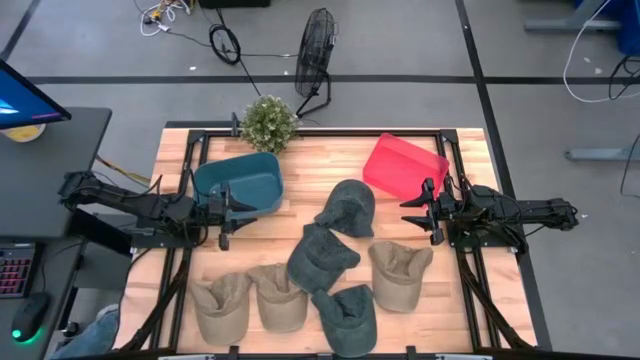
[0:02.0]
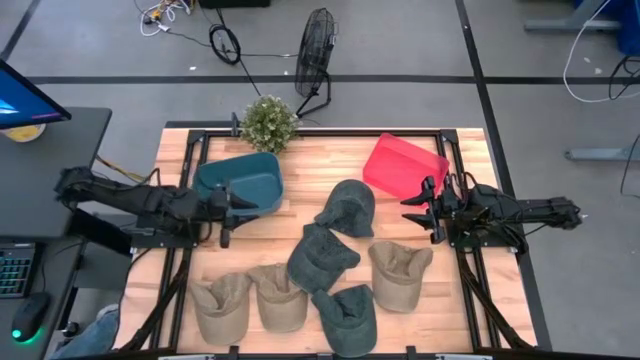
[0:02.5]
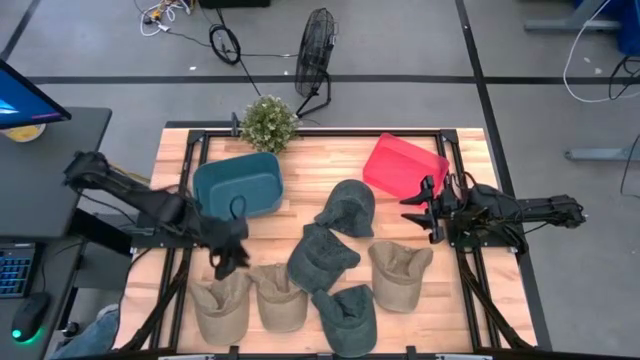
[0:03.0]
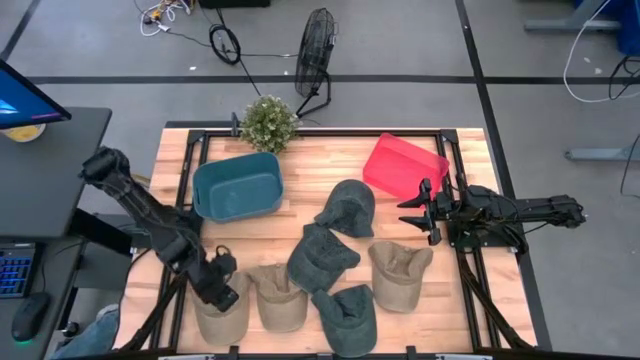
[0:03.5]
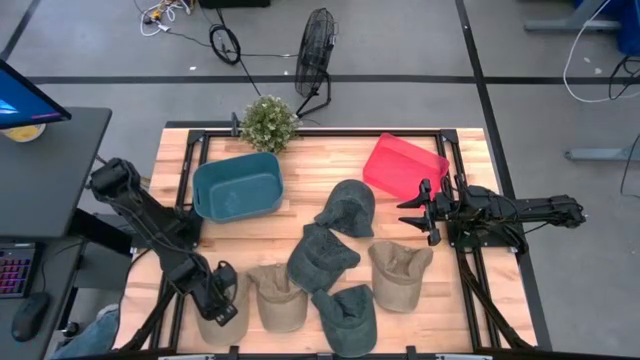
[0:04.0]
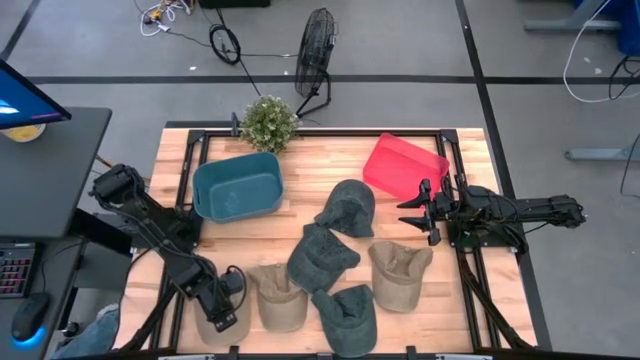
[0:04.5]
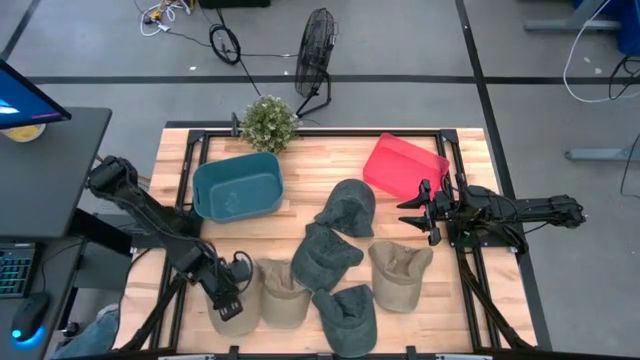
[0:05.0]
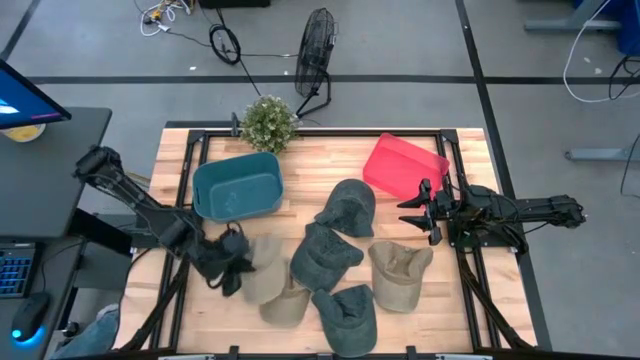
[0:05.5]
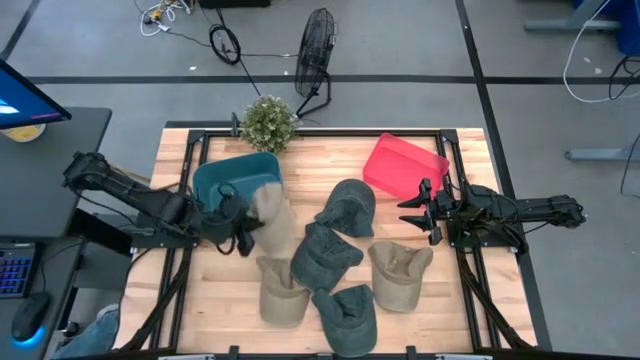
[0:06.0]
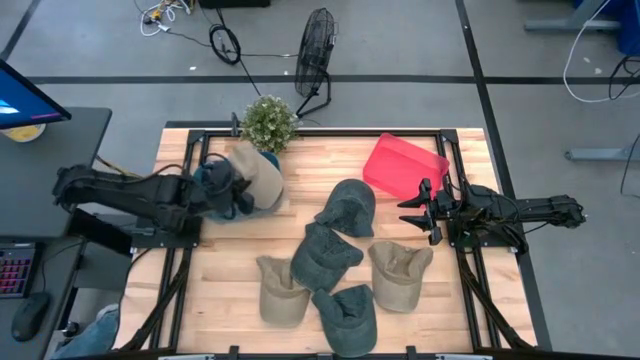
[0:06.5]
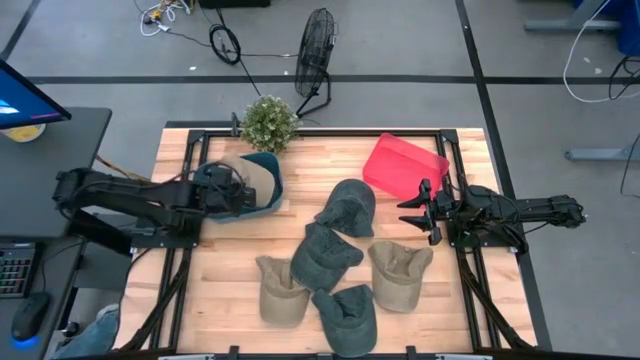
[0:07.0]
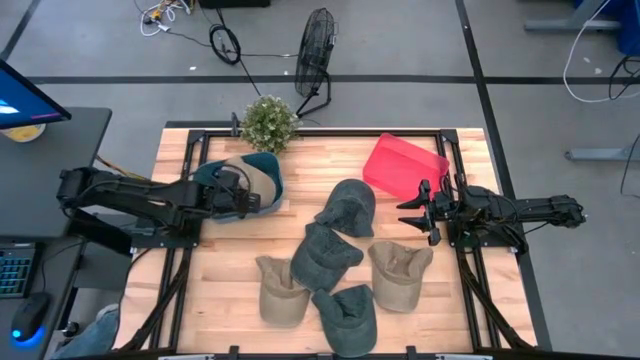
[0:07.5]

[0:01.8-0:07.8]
Task: Pick & Place hat
Put the left brown cap into the blue bin

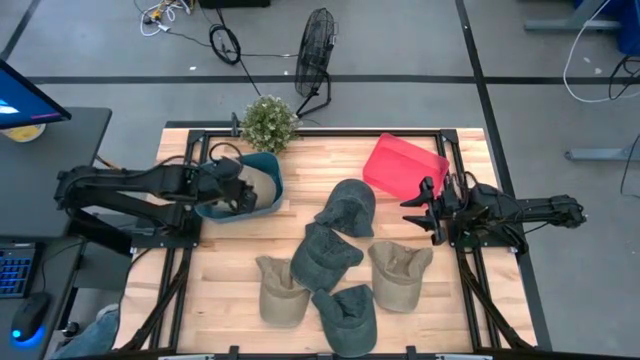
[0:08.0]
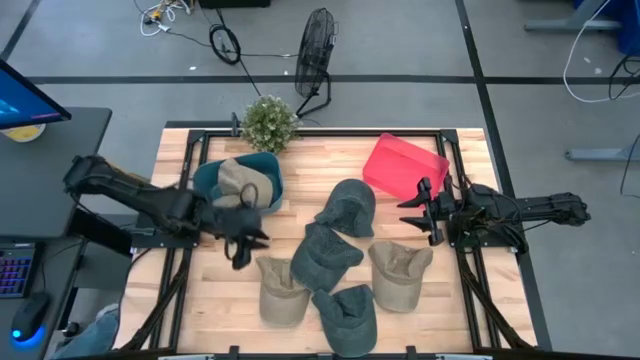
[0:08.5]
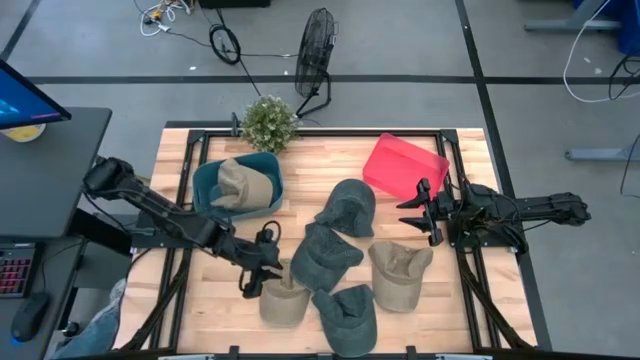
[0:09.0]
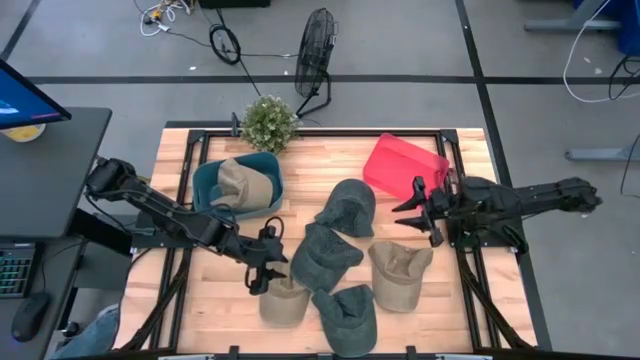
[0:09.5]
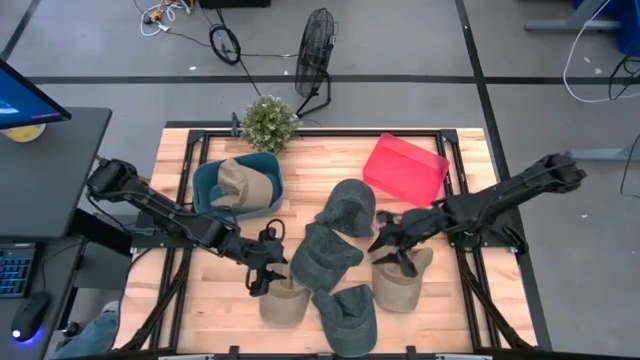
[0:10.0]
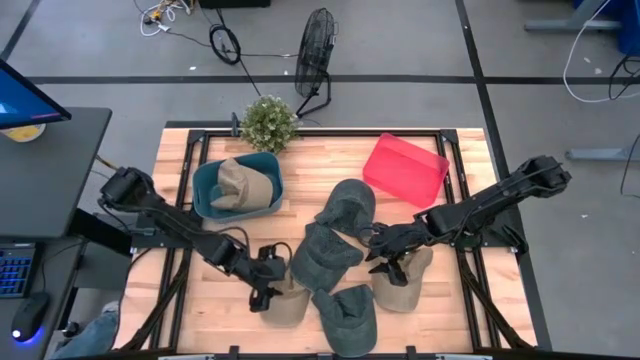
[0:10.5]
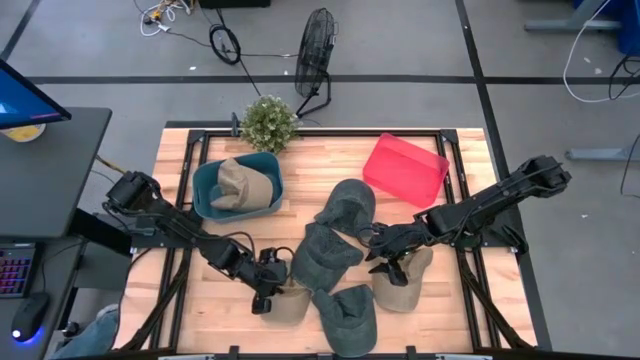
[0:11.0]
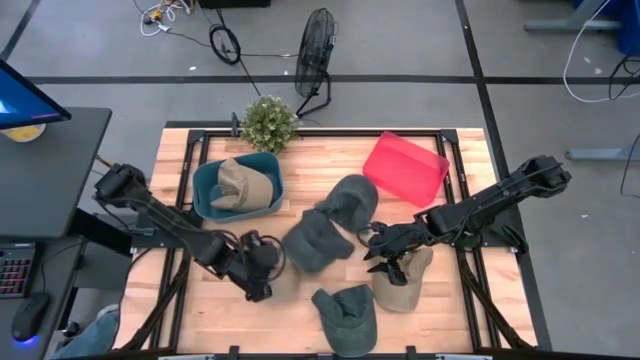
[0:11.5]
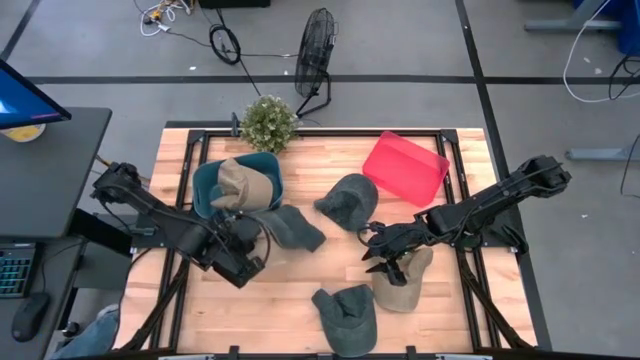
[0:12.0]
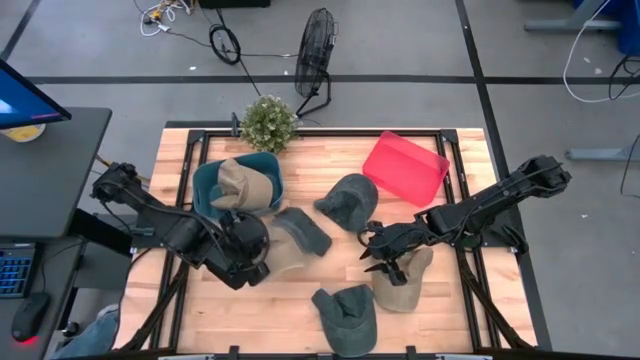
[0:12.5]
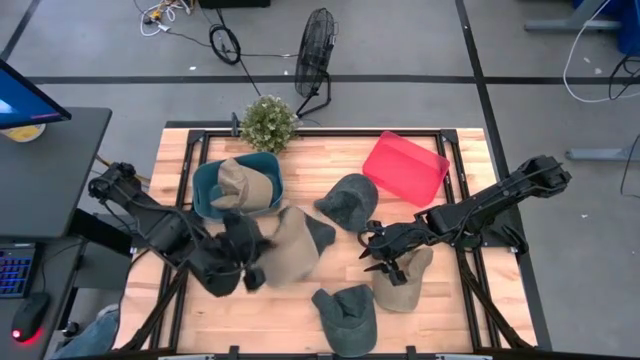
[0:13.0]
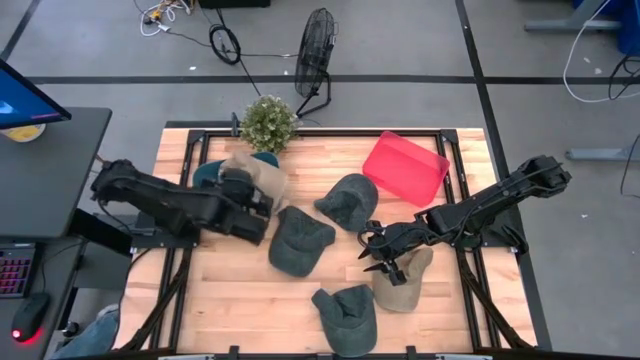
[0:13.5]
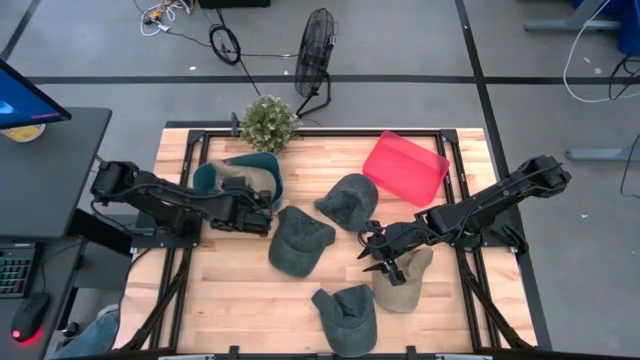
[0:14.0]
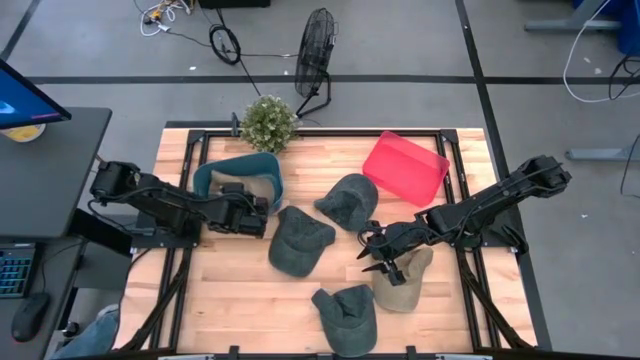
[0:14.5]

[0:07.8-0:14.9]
Put the left brown cap into the blue bin

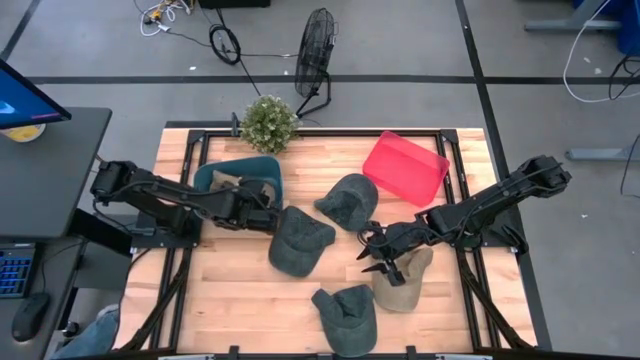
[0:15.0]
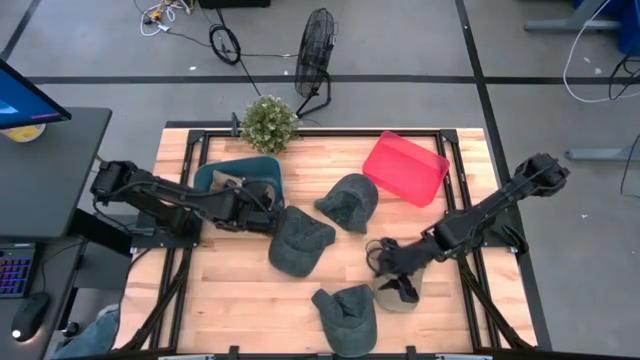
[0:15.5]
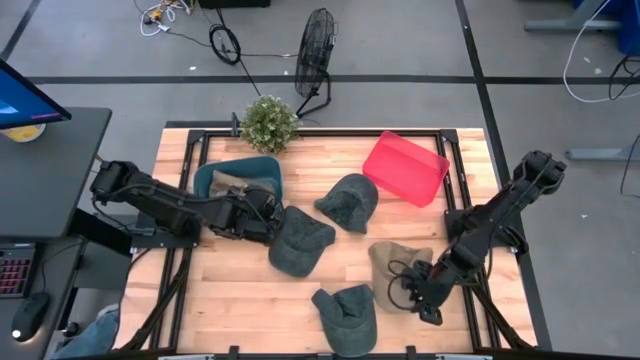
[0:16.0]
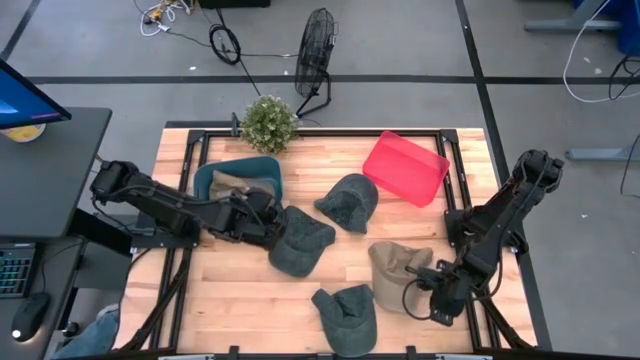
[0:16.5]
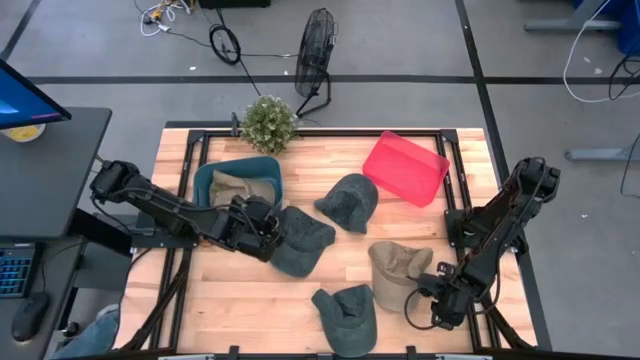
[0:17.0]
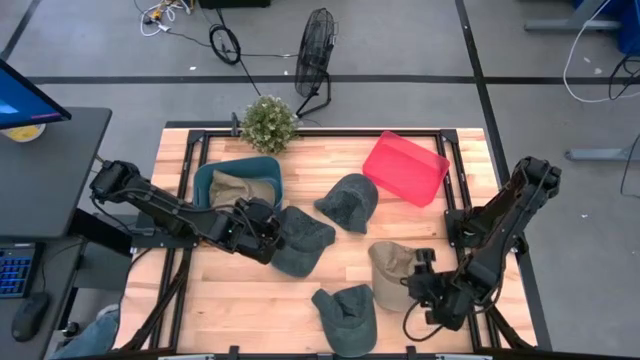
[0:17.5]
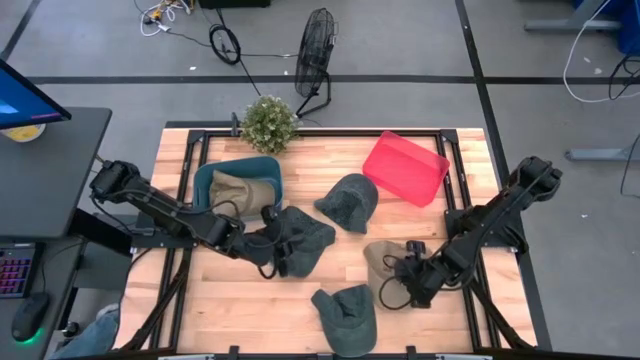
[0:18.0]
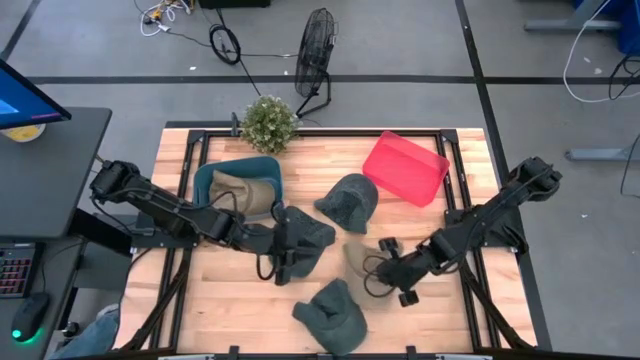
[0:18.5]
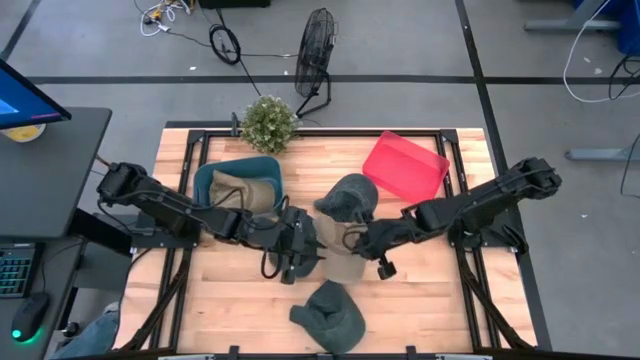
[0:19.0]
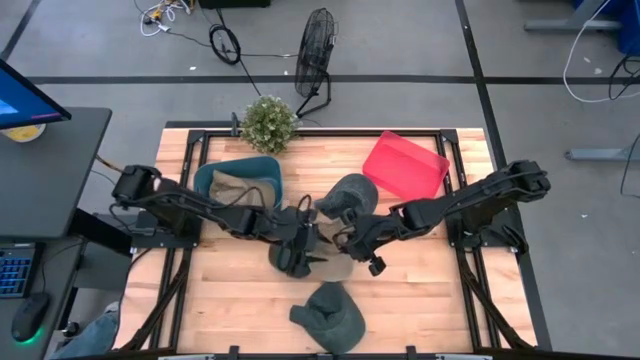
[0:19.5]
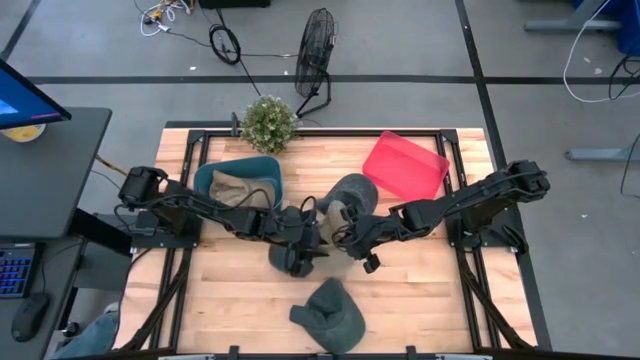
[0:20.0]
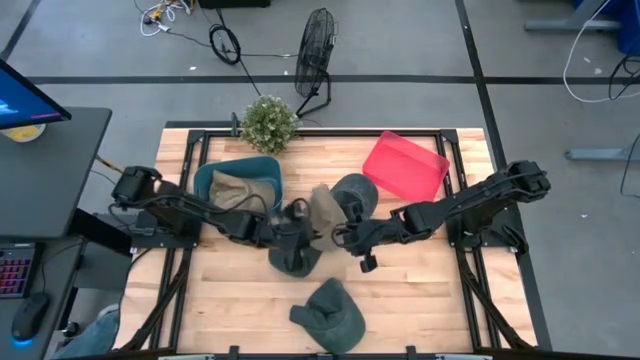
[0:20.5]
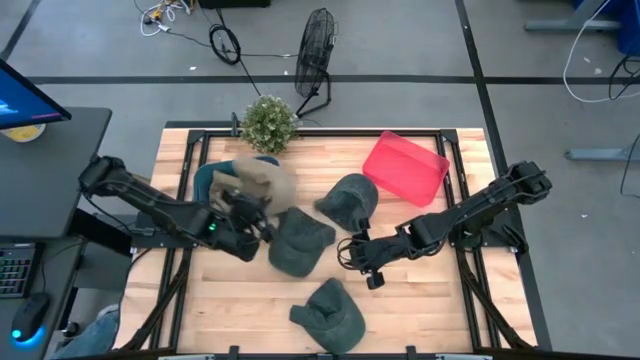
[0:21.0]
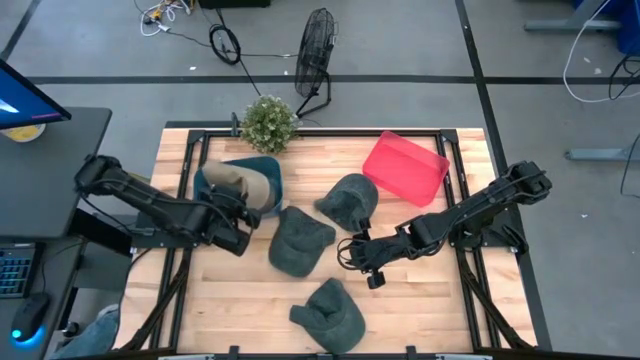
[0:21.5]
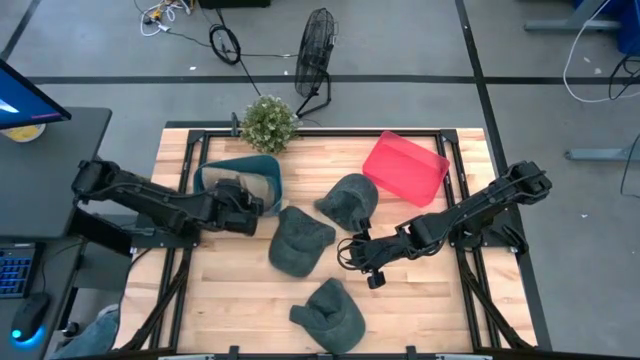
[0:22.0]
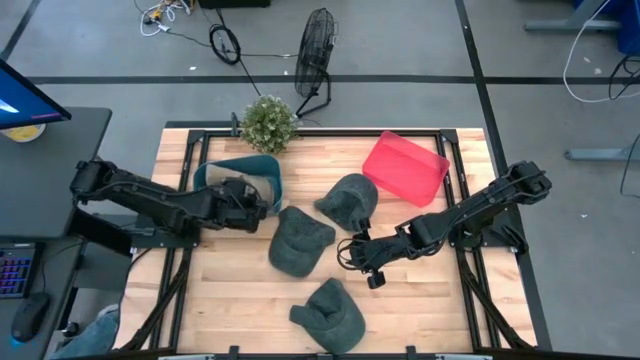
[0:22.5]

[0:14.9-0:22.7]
Put the brown cap into the blue bin

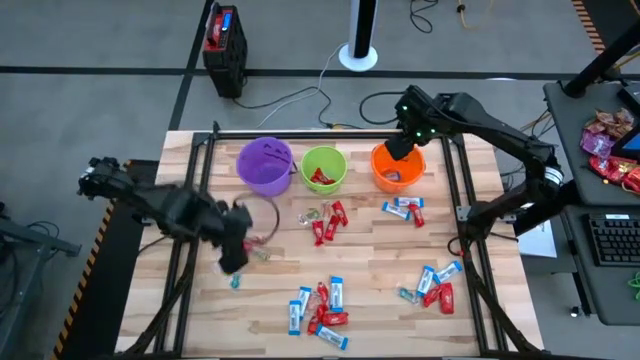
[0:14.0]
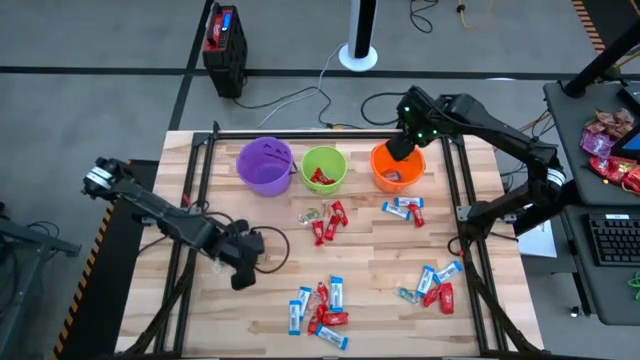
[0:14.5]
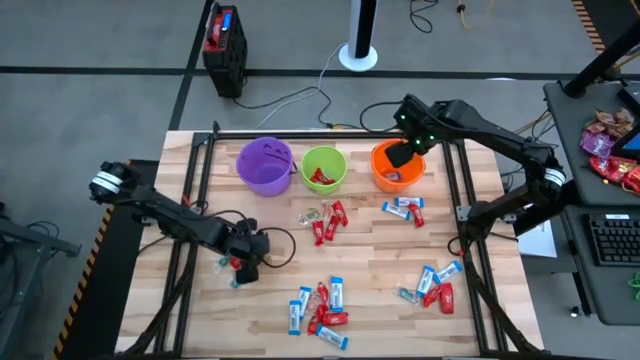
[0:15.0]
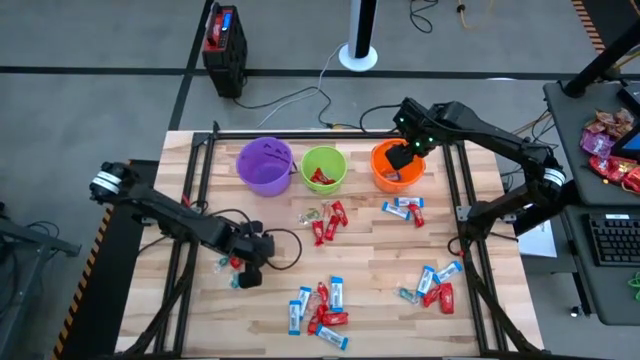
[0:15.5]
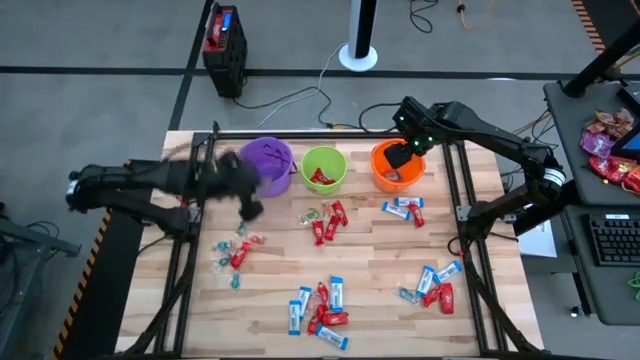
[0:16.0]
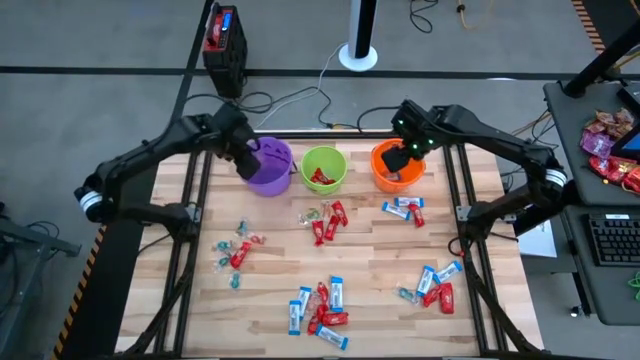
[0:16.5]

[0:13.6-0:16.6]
Task: Sort candy by brand, put in halloween buckets
Put the green gummy candy into the purple bucket
